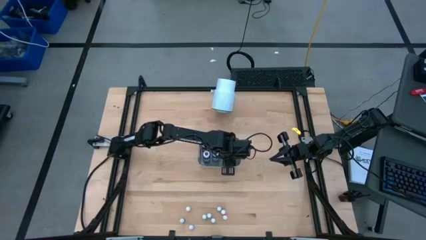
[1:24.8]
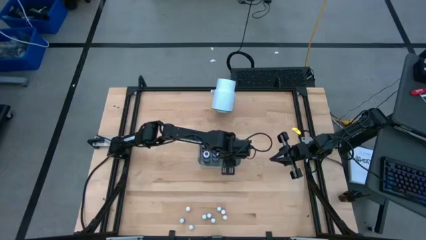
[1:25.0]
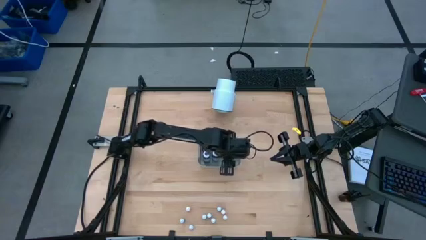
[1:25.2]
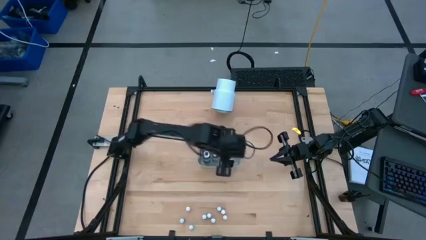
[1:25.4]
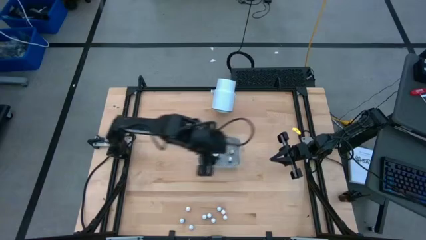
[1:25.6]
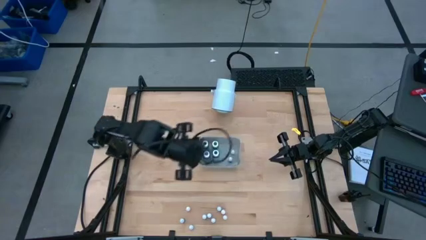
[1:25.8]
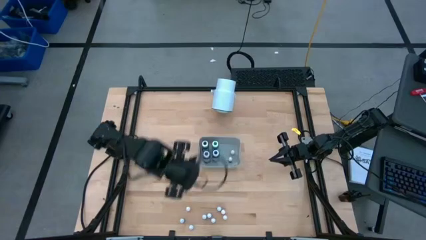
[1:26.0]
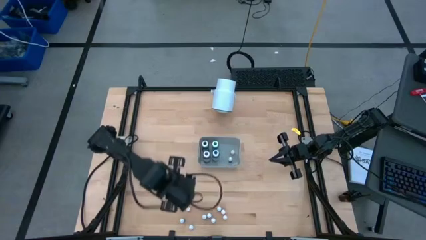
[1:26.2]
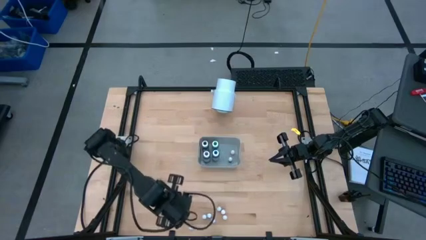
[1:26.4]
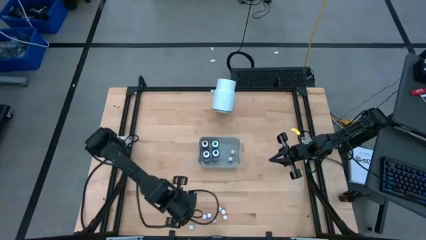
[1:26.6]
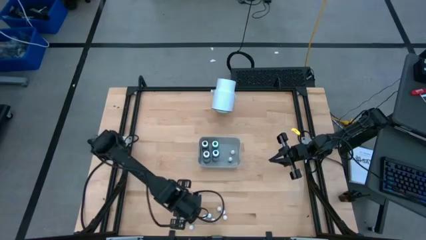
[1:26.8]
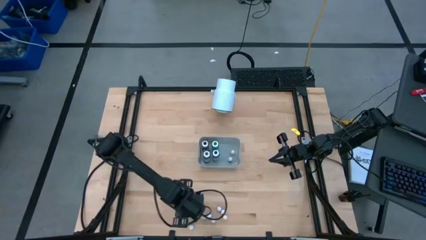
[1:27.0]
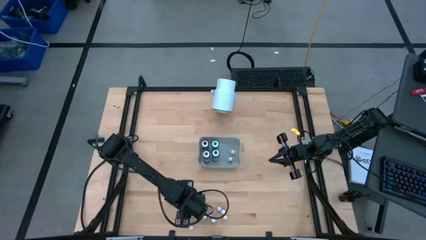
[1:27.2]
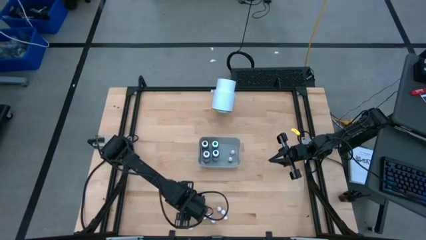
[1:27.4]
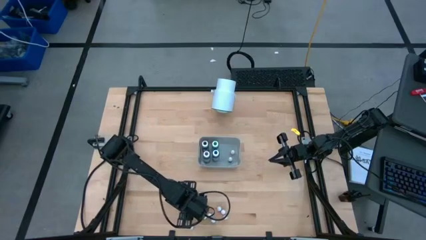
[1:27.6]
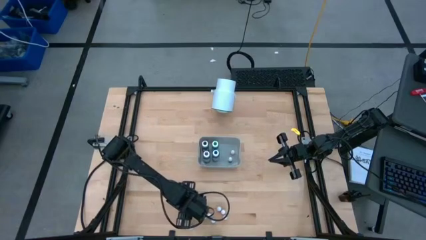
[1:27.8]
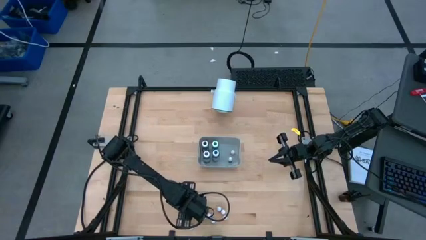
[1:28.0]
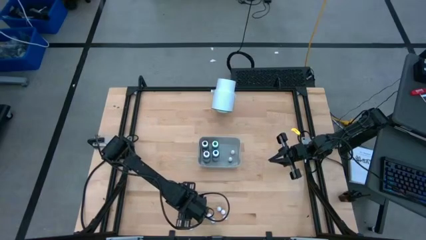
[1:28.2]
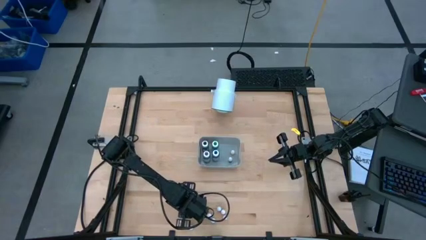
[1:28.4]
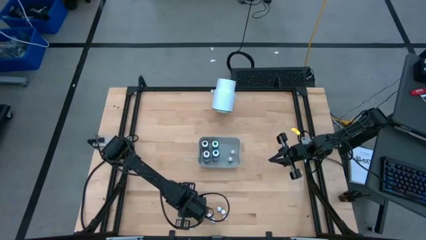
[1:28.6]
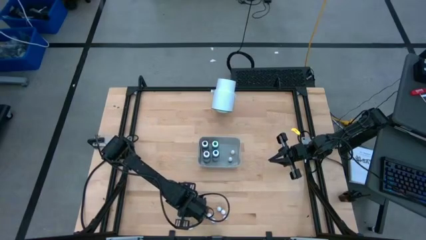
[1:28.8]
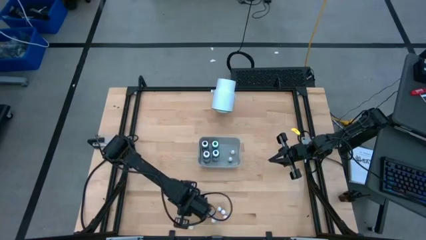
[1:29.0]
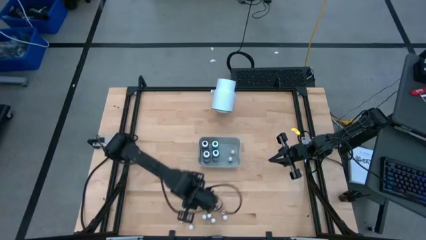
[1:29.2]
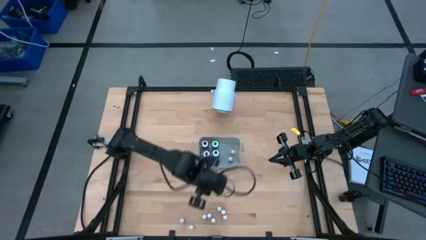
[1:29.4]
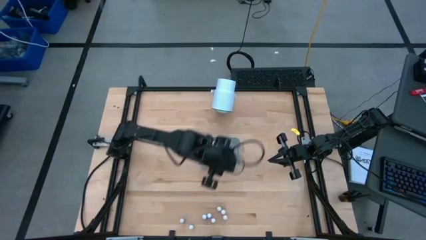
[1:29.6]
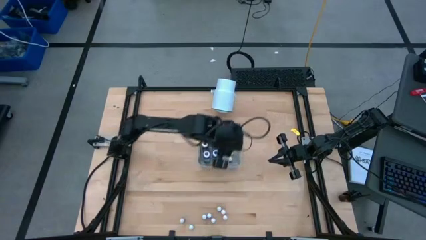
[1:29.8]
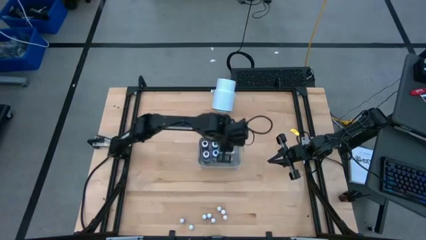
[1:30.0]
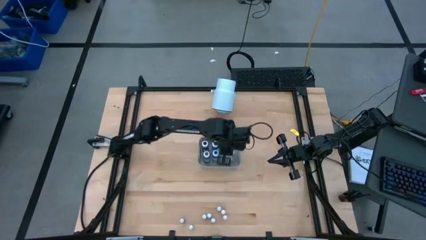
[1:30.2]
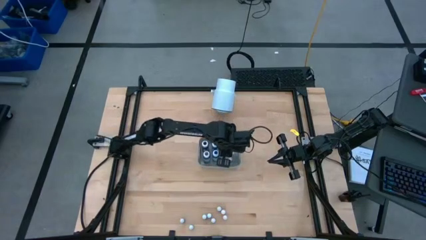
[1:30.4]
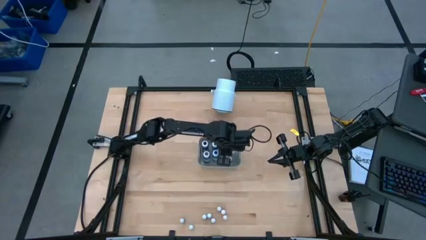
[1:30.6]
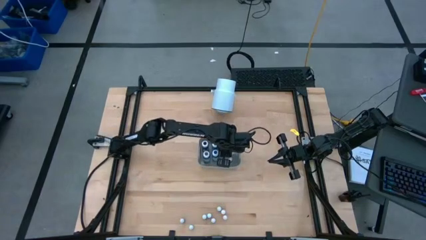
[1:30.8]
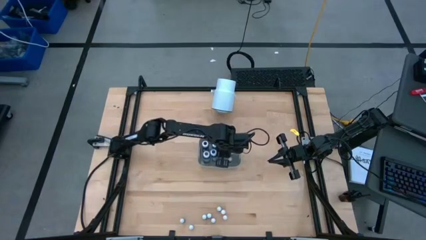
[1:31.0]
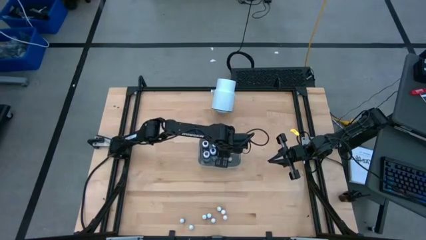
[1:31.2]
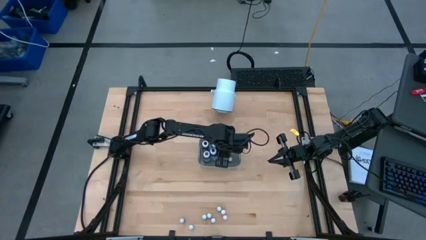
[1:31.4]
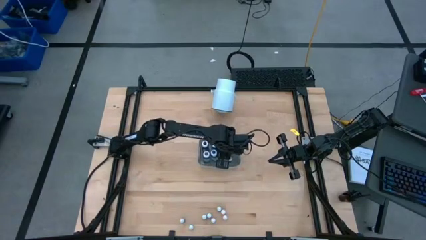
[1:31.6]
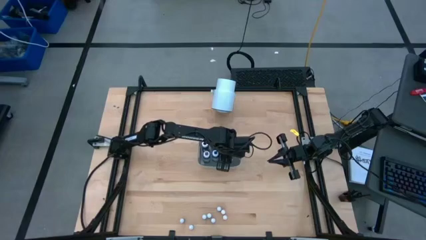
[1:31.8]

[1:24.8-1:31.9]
Task: Pick & Place food coloring
Put the small yellow food coloring bottle into the gray bin

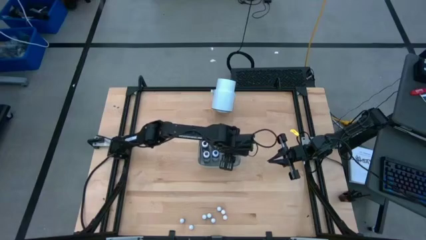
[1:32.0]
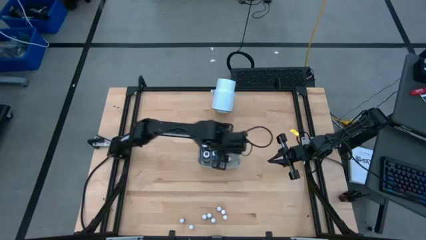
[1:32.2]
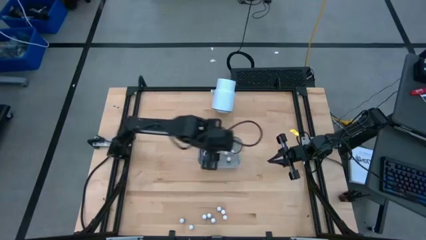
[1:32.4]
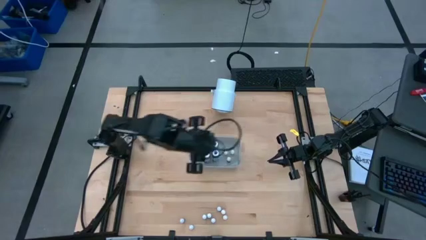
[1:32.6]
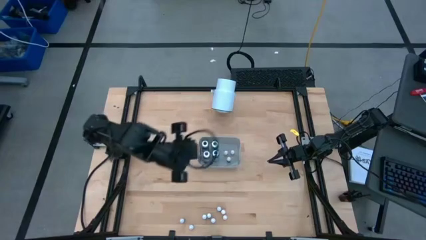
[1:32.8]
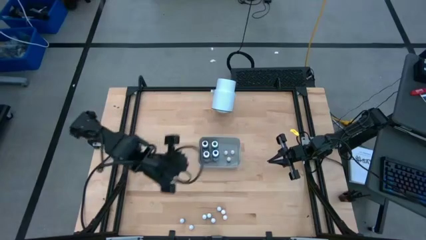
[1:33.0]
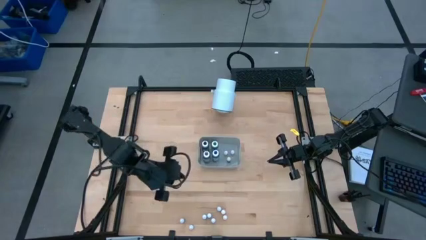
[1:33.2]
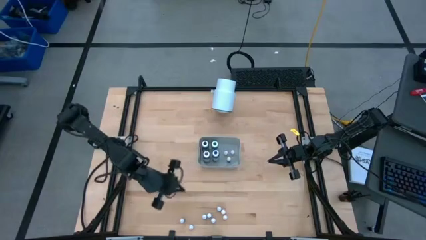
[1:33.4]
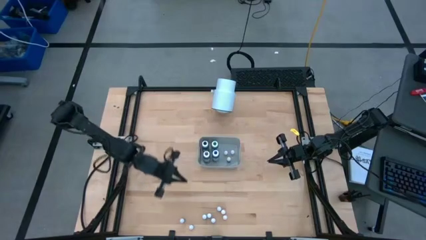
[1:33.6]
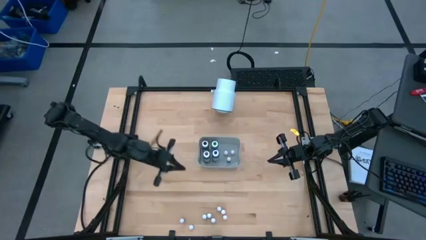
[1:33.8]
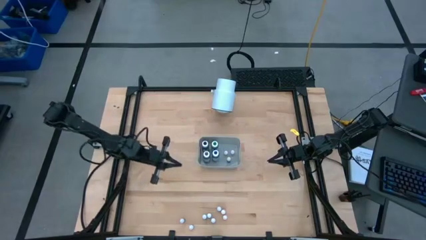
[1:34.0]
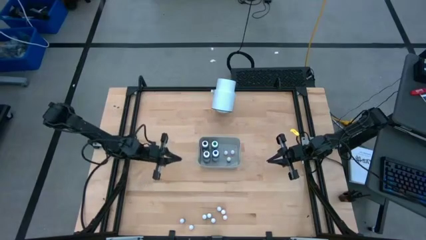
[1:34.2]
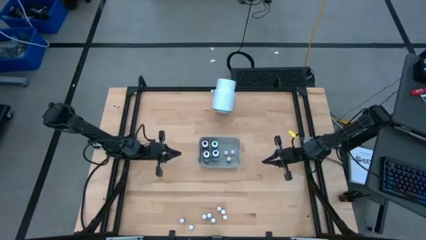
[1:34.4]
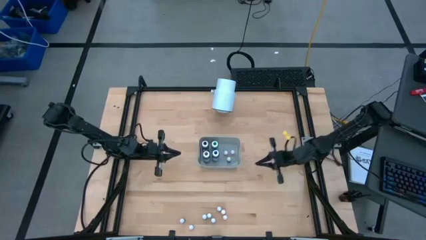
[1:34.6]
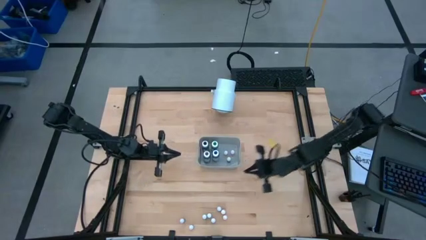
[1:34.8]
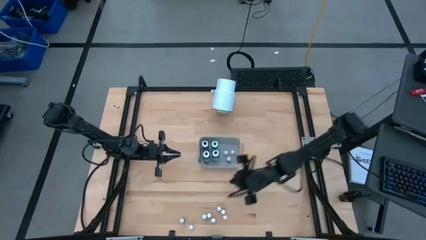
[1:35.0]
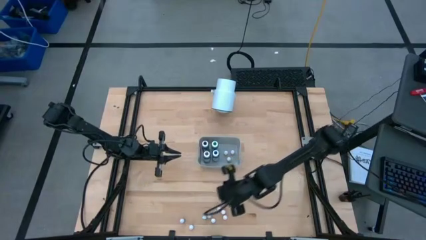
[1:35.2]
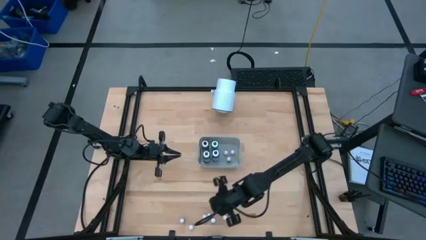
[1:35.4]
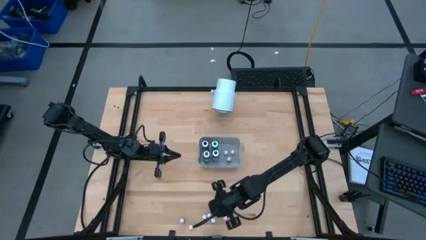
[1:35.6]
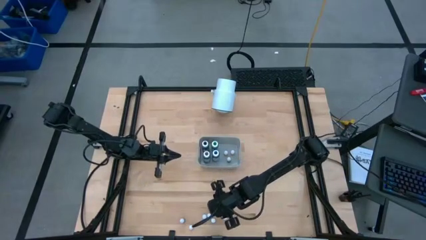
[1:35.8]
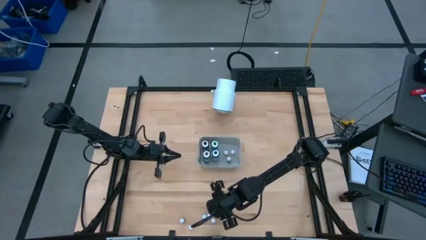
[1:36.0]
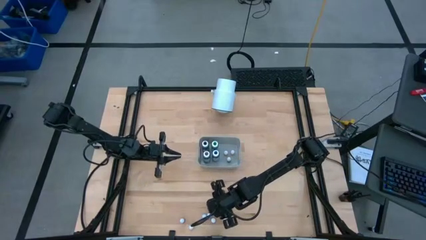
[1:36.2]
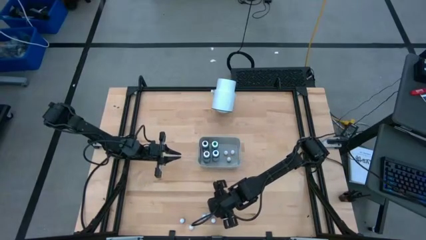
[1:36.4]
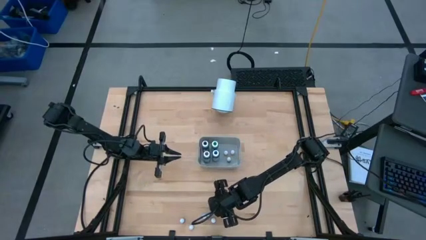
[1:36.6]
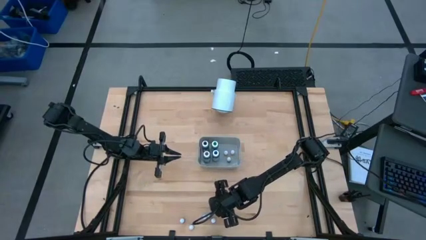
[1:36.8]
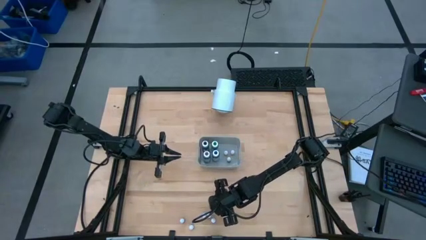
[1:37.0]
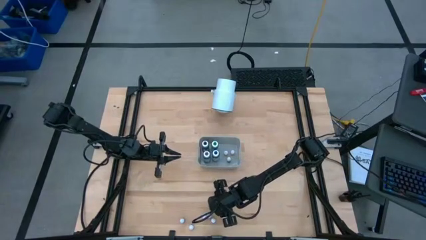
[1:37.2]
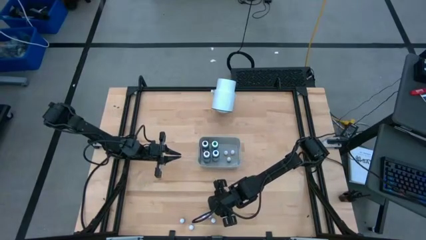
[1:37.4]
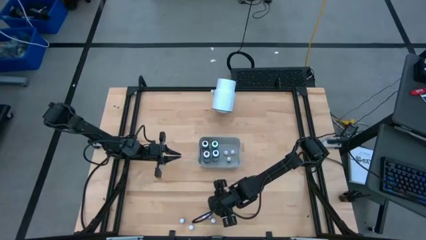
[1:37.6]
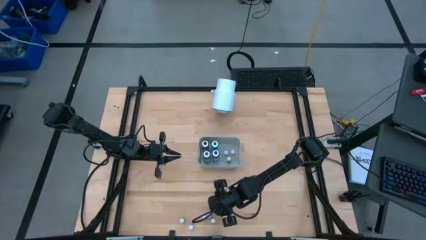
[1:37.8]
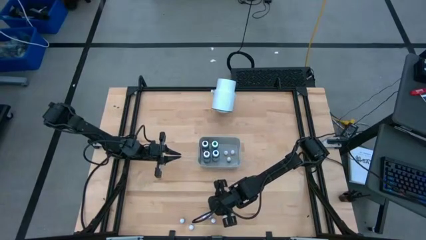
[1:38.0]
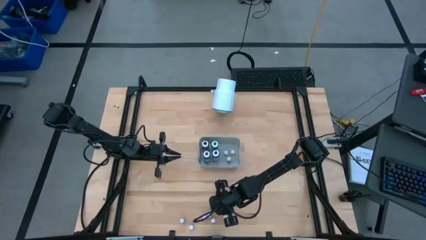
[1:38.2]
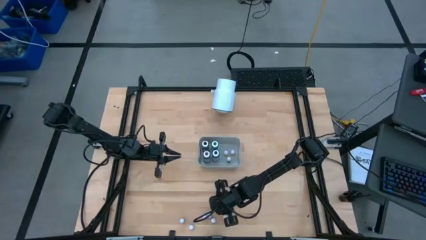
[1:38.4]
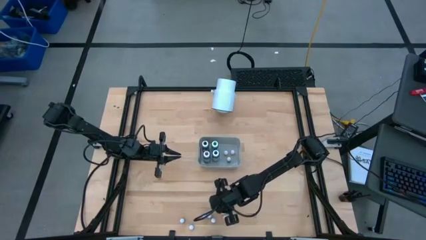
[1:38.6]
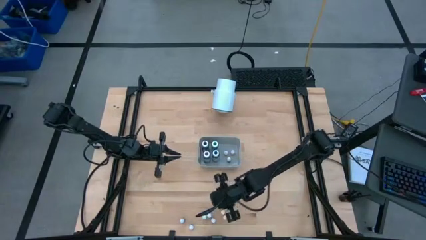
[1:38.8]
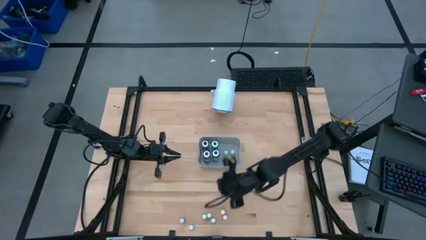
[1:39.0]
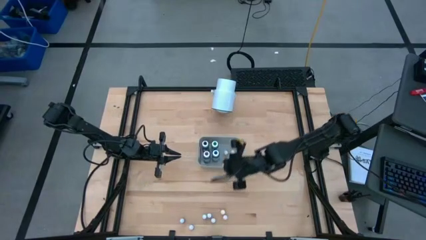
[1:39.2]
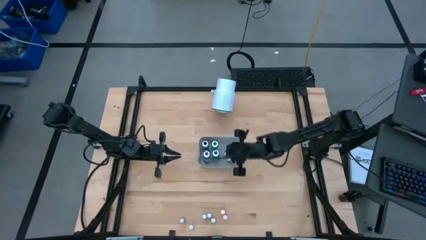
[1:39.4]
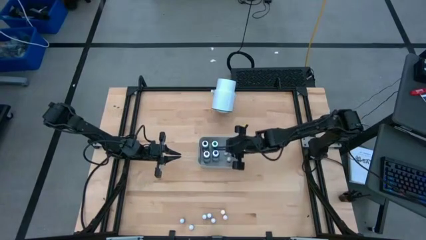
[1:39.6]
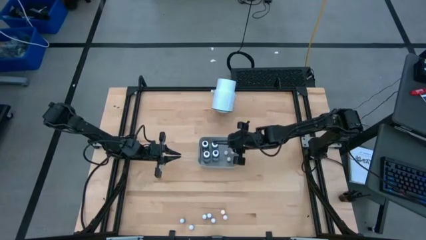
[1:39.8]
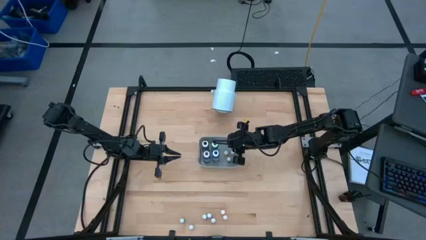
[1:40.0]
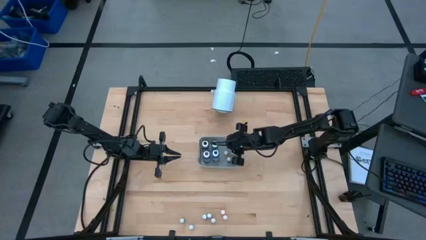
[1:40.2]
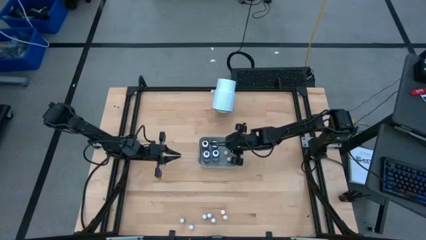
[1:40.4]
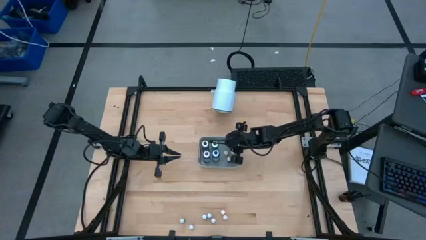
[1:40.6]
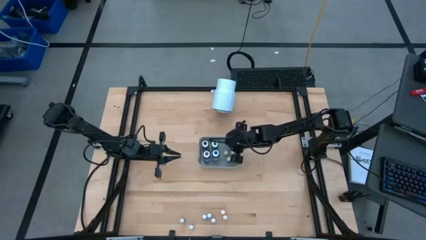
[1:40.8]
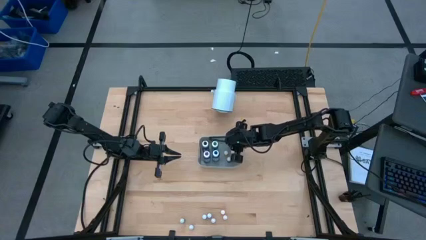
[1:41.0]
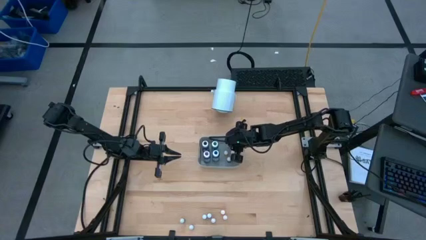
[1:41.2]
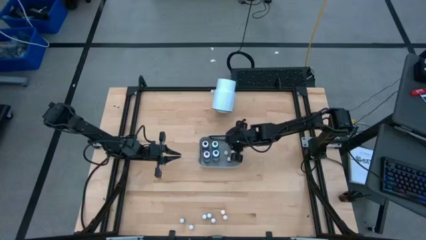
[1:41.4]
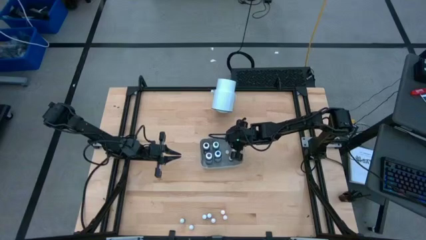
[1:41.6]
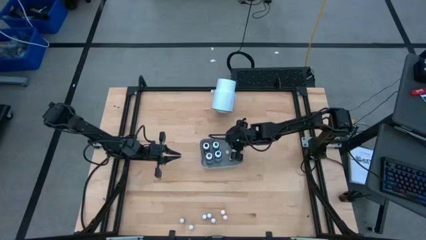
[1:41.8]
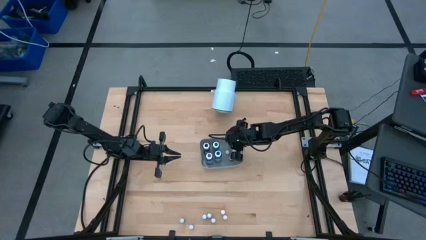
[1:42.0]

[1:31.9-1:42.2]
Put the small green food coloring bottle into the gray bin
